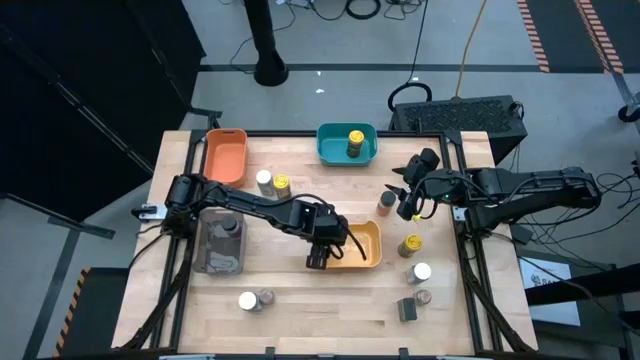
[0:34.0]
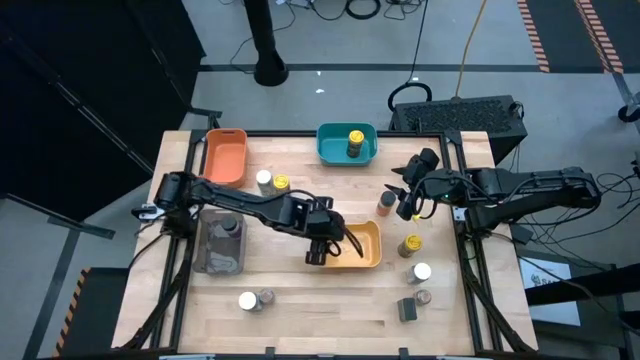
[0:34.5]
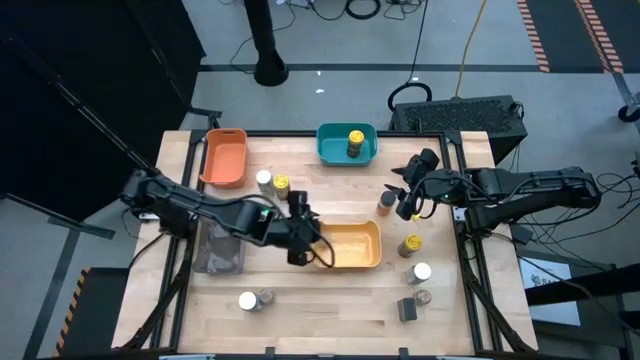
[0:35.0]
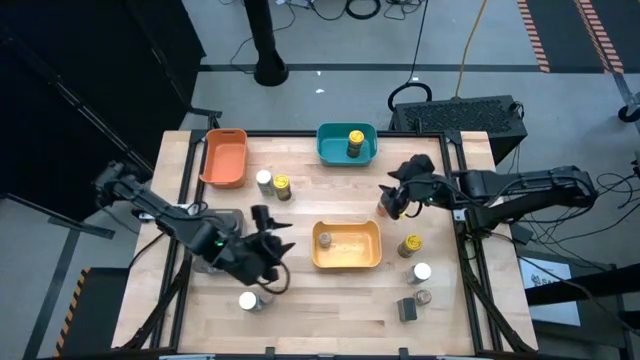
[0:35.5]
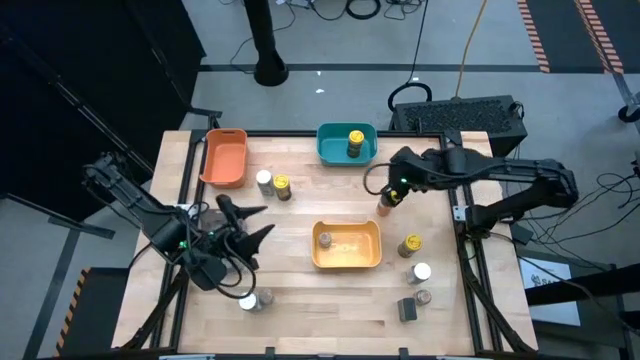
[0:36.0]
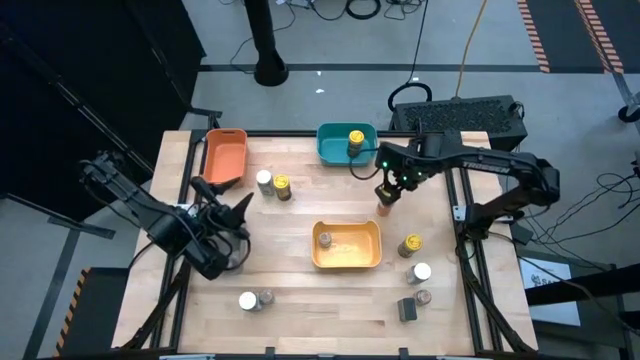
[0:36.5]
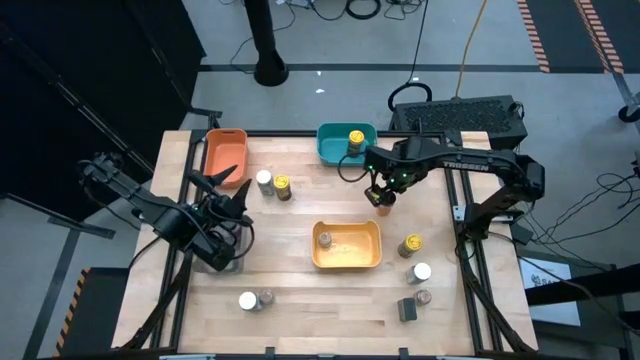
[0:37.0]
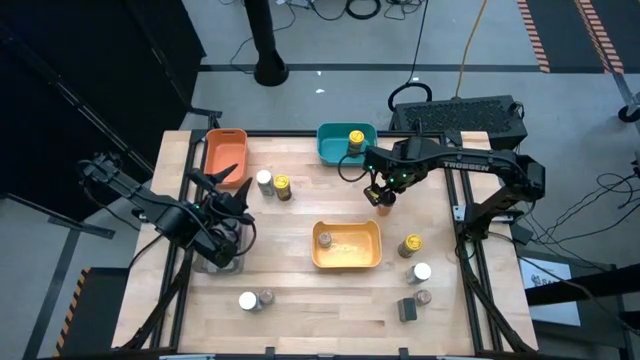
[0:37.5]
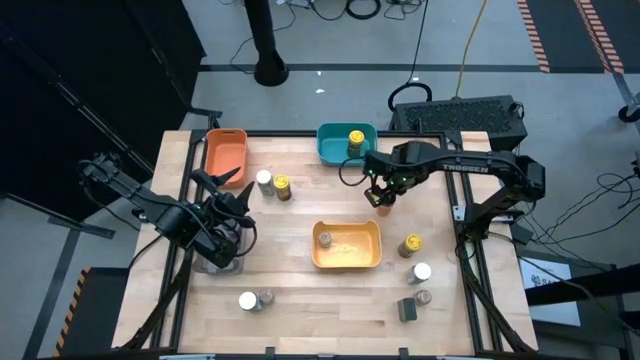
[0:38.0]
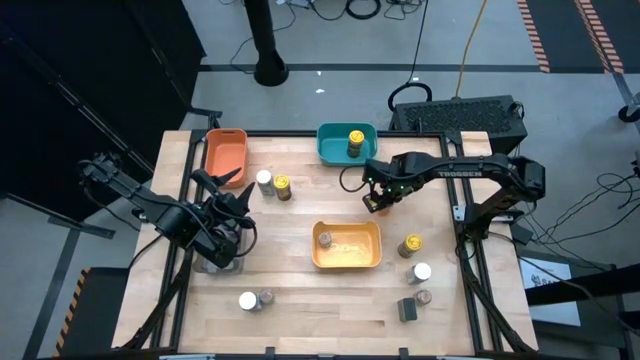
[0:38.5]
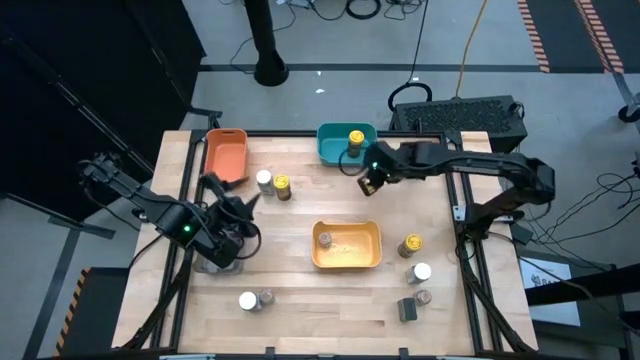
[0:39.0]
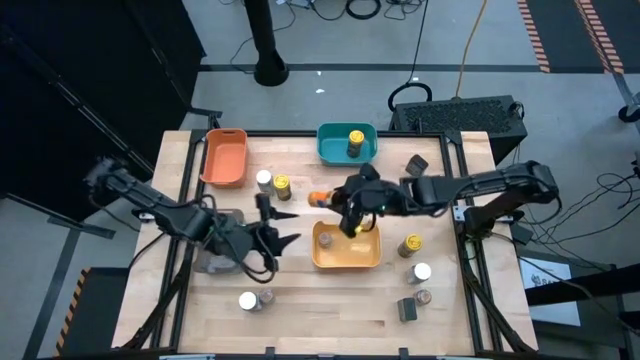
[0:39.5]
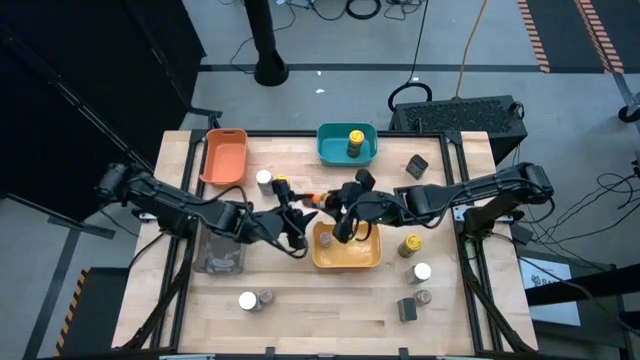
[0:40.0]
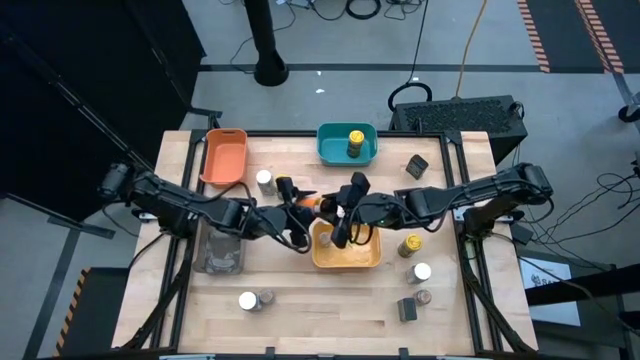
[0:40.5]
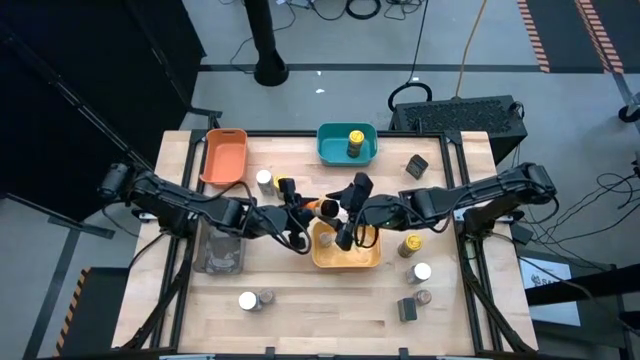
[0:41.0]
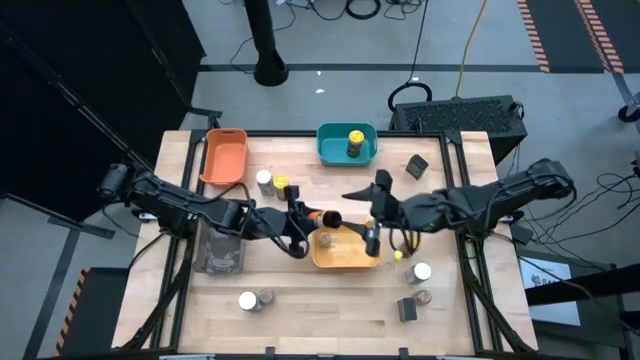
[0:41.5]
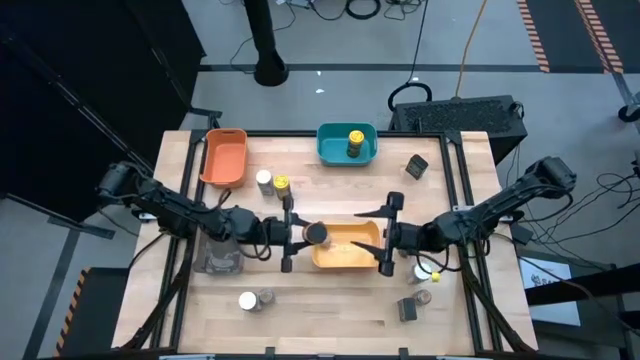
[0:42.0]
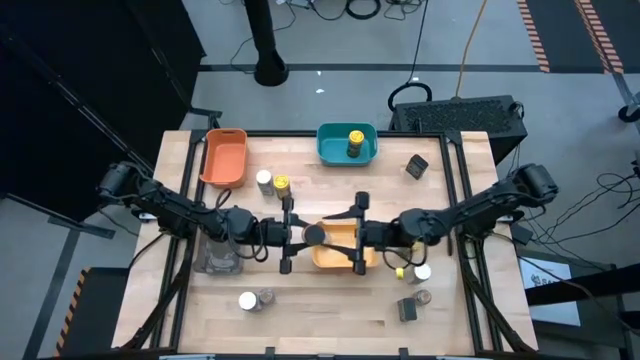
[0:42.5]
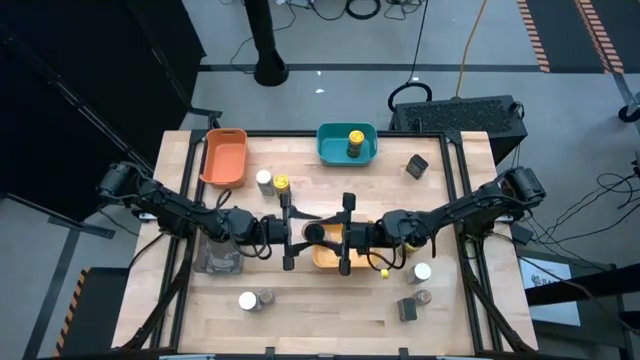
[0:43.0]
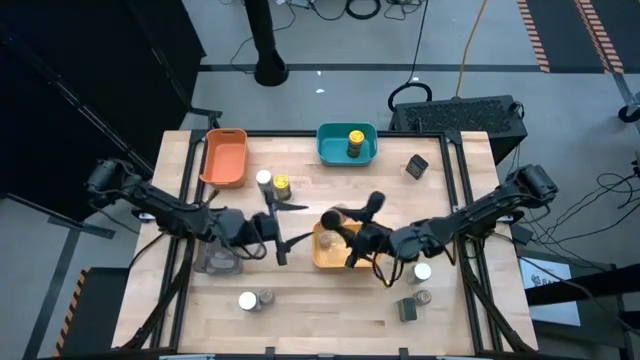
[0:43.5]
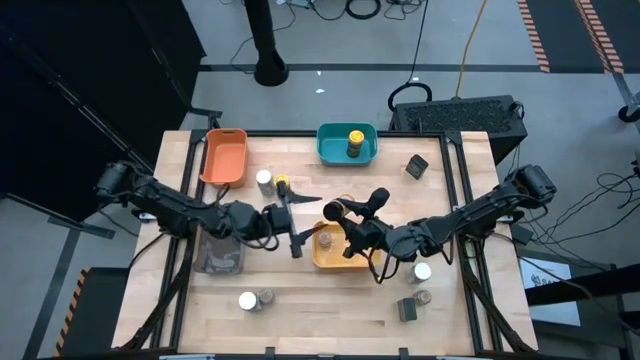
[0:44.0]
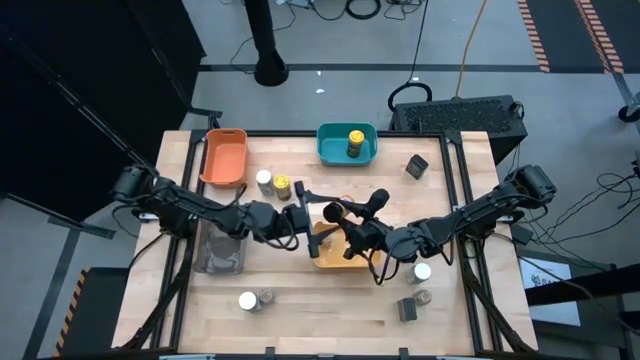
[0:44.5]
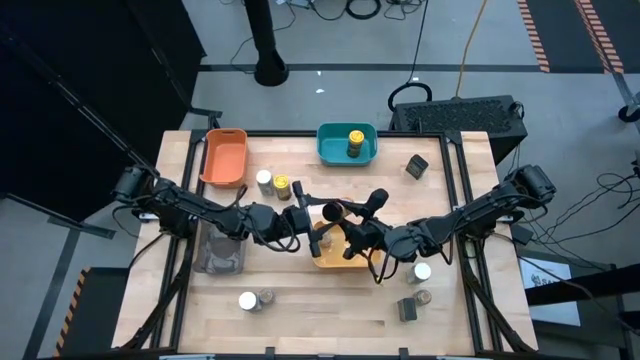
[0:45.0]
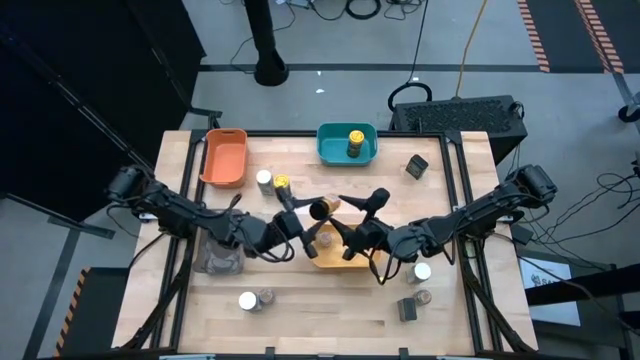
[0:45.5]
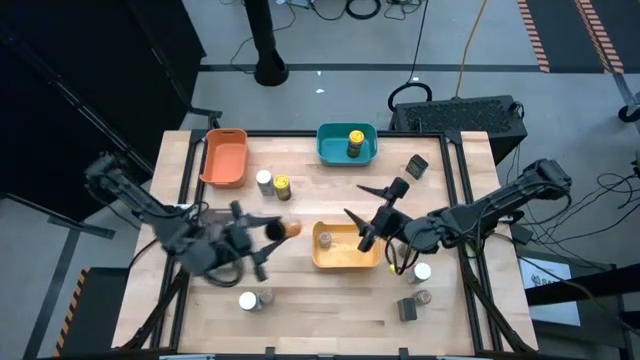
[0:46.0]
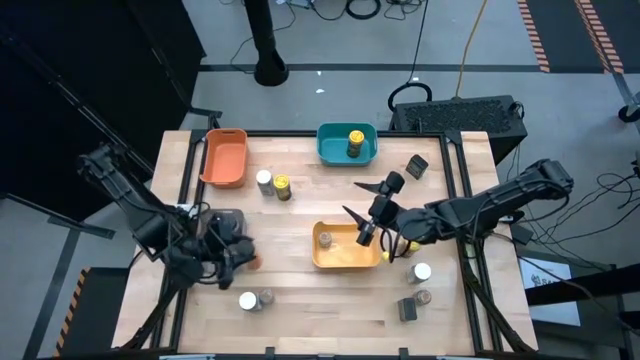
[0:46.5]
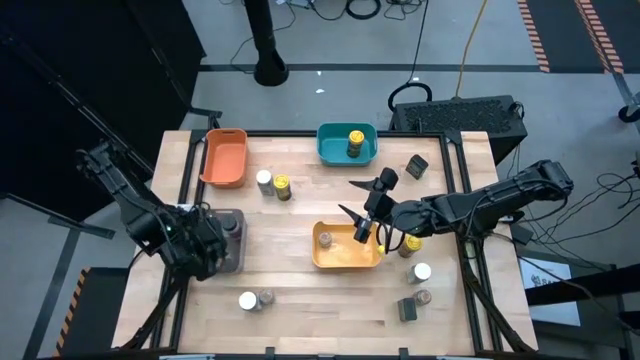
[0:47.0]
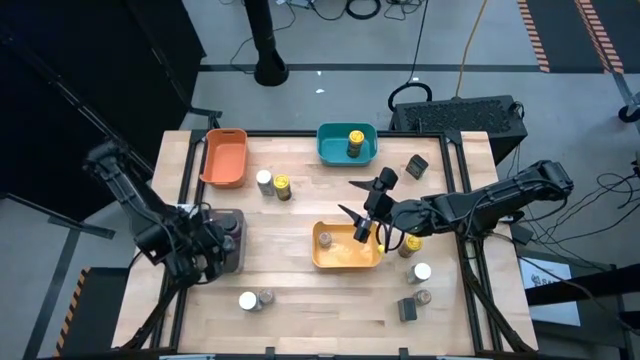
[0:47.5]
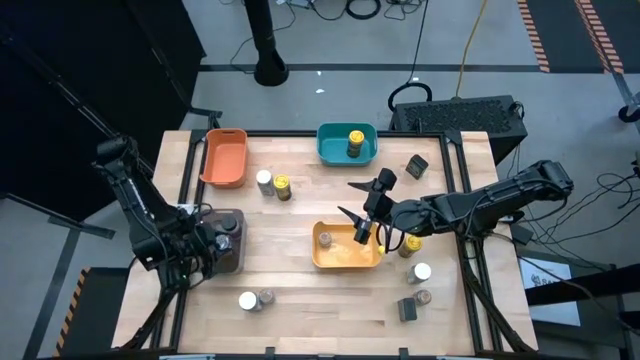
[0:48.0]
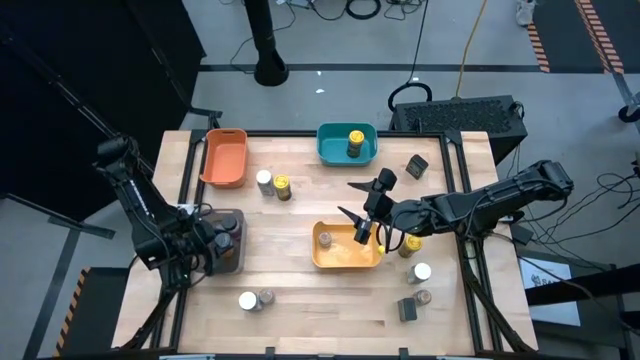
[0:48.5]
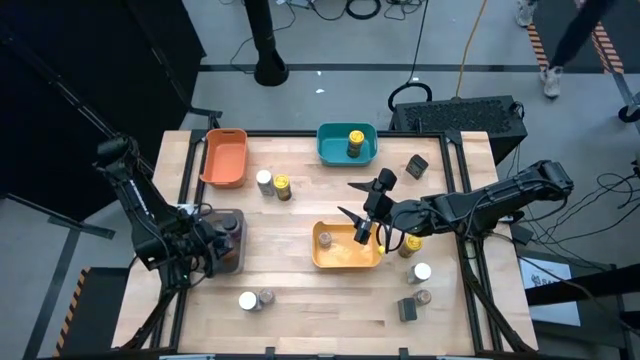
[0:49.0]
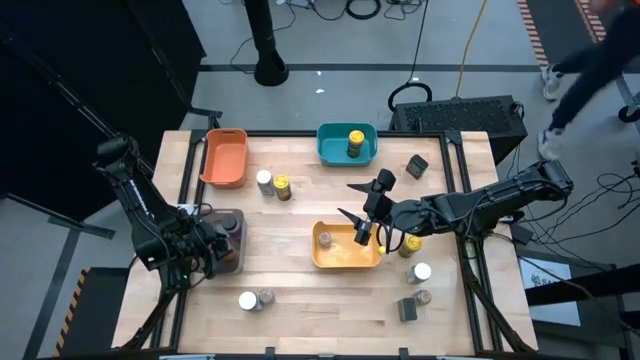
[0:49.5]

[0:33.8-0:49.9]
Task: Sort spices by type
Put the black spice bottle into the black bin

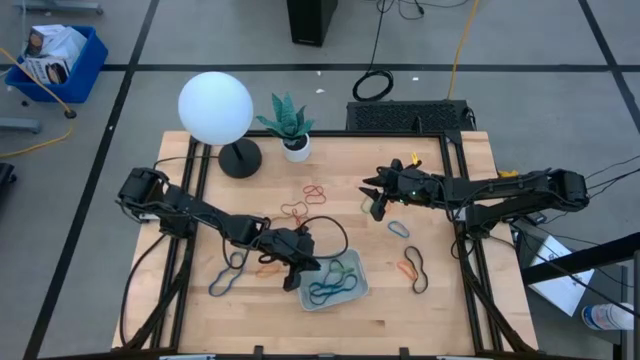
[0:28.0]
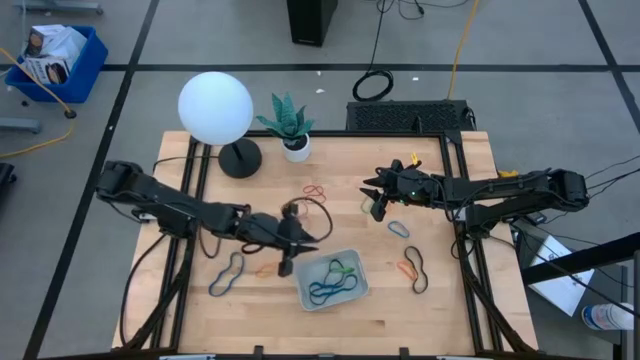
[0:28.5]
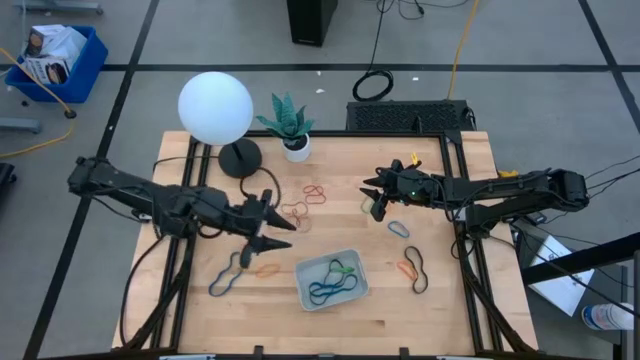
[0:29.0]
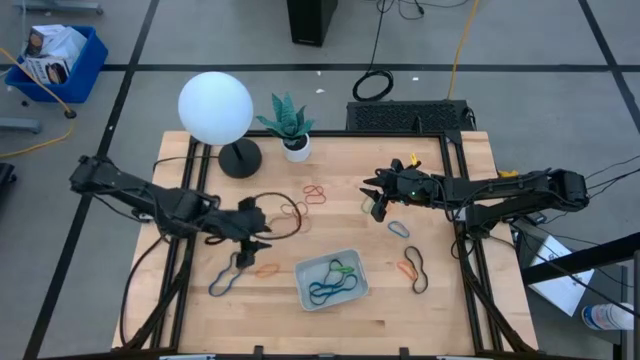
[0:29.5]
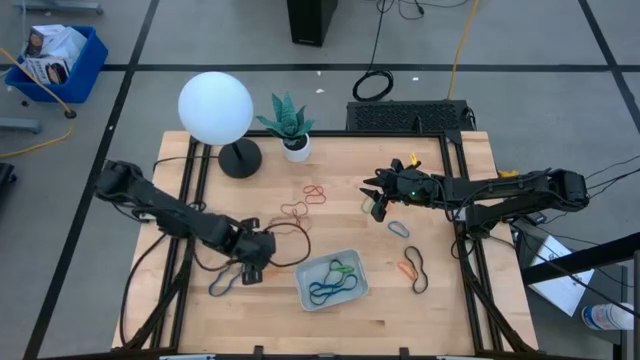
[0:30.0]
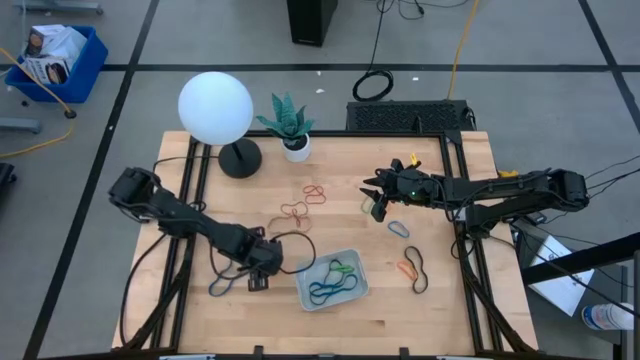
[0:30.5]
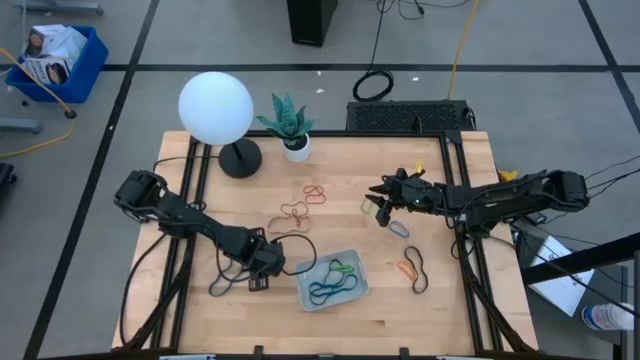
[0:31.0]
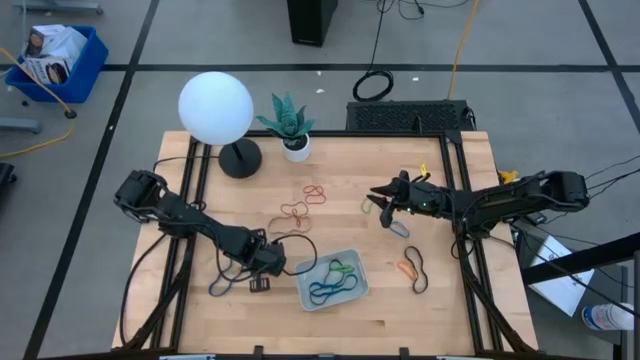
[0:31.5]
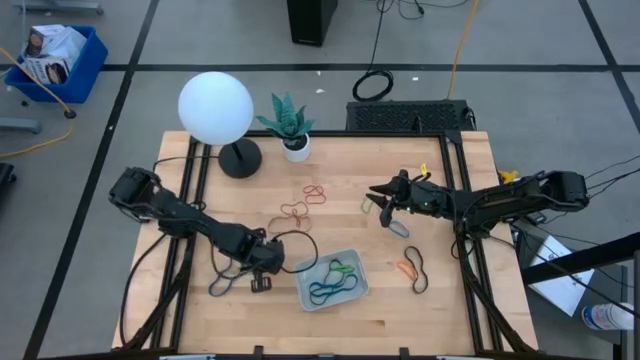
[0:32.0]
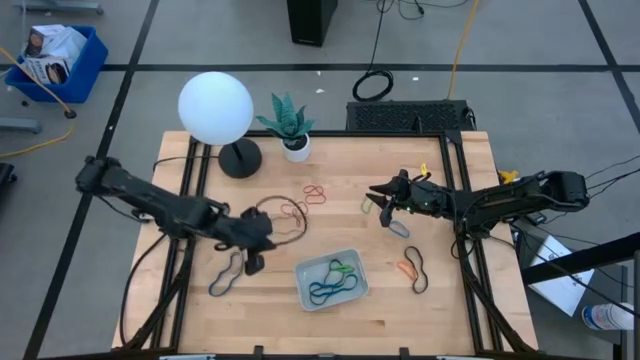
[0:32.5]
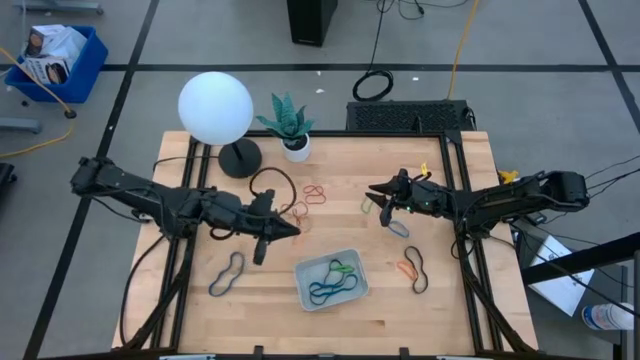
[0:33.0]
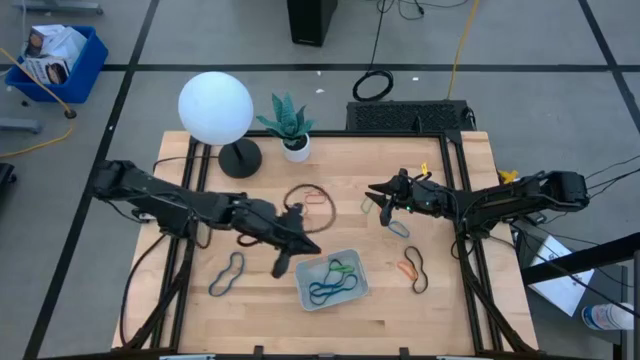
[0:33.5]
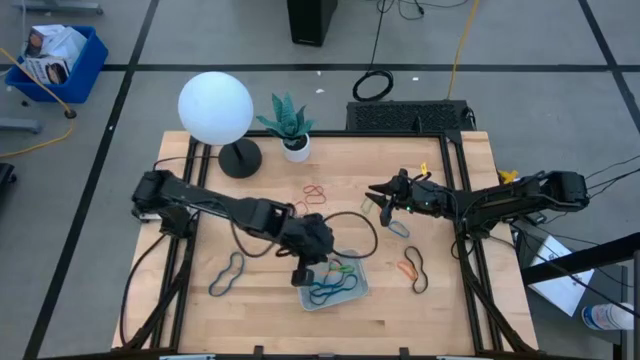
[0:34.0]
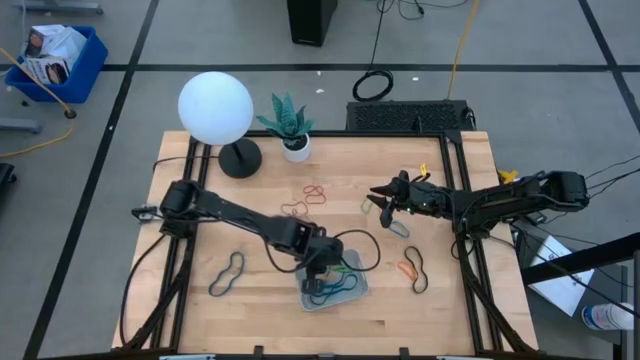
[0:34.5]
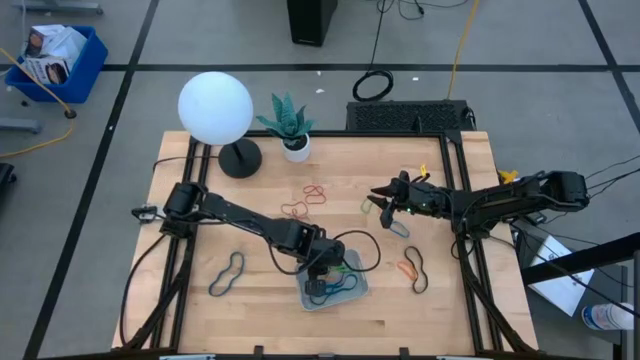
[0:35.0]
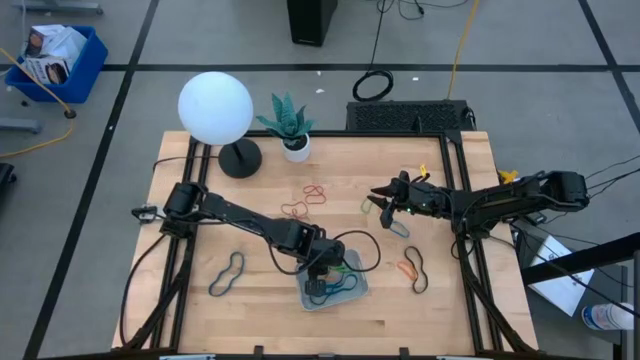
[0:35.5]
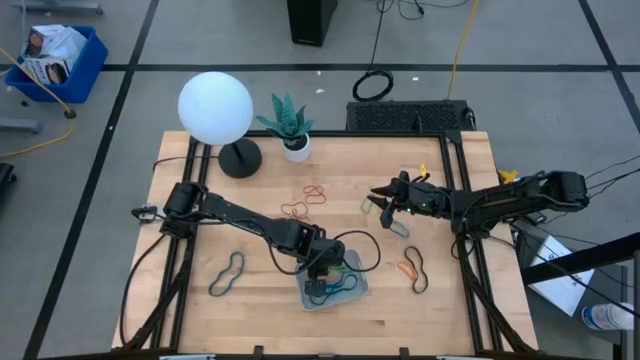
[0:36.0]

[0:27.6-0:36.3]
Task: Pick and place rubber bands into bin
Put the bottom left orange rubber band into the gray bin
